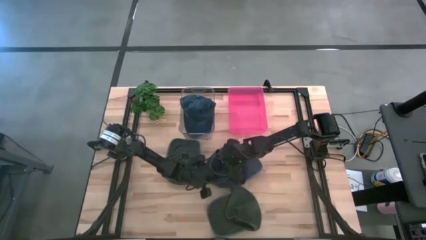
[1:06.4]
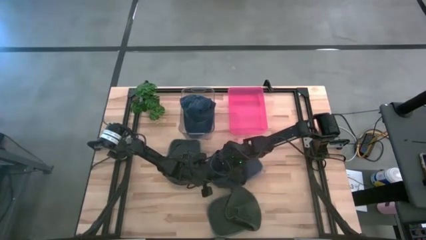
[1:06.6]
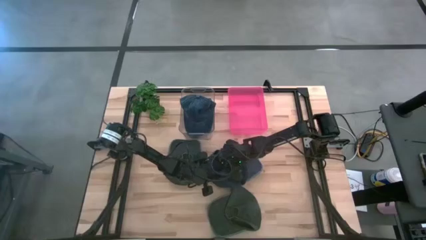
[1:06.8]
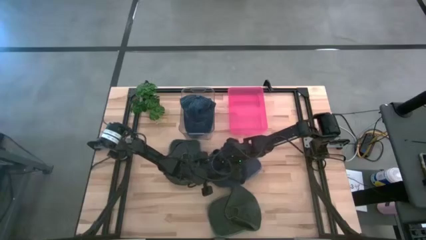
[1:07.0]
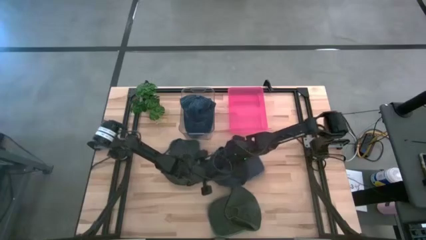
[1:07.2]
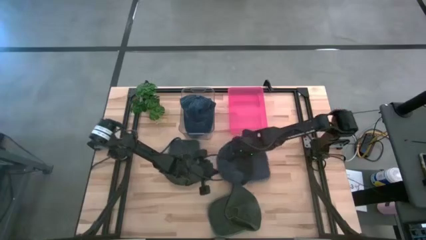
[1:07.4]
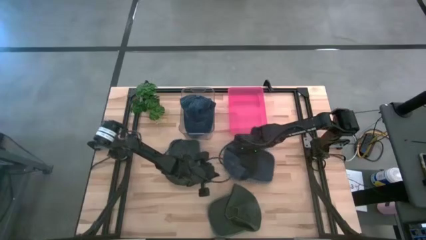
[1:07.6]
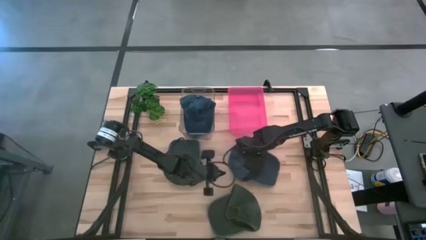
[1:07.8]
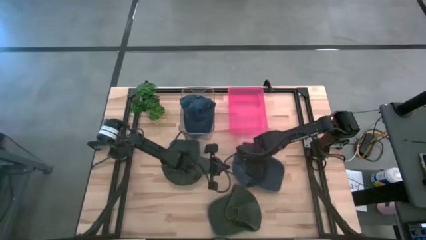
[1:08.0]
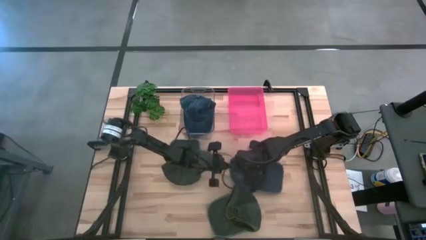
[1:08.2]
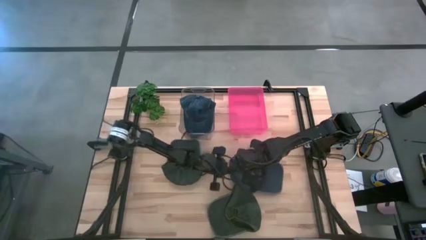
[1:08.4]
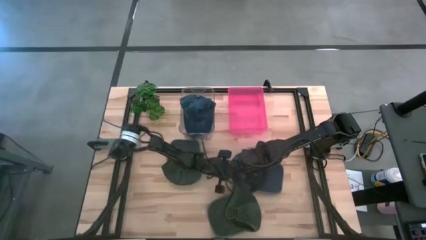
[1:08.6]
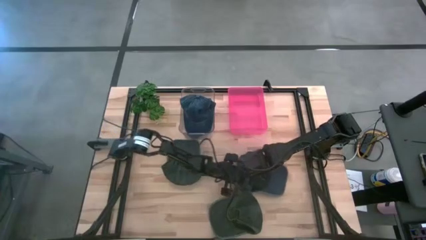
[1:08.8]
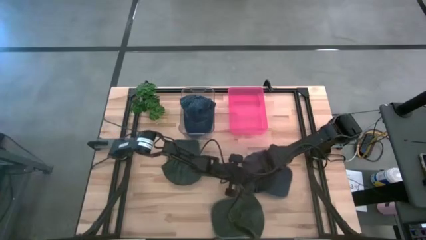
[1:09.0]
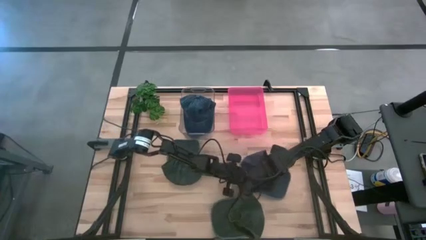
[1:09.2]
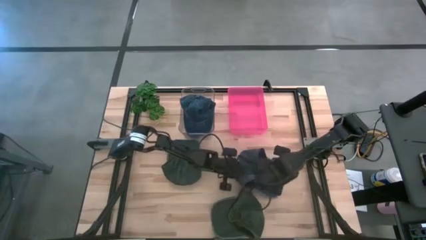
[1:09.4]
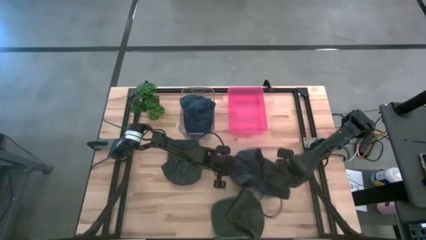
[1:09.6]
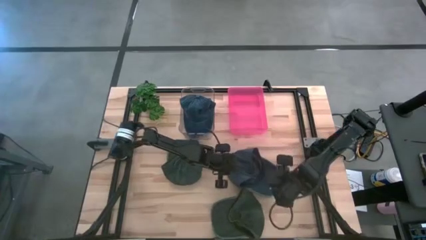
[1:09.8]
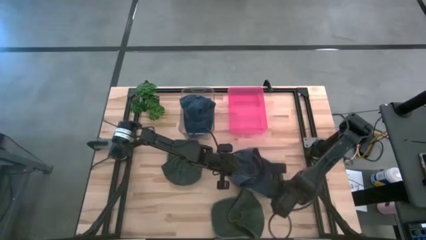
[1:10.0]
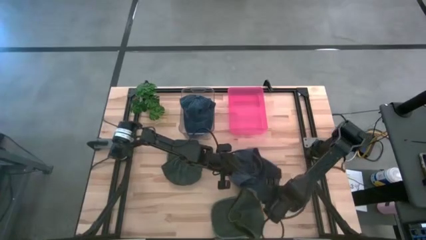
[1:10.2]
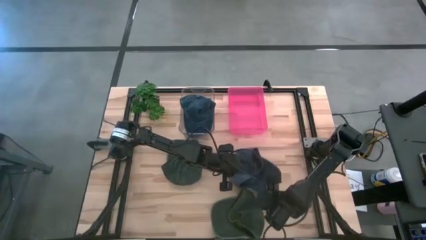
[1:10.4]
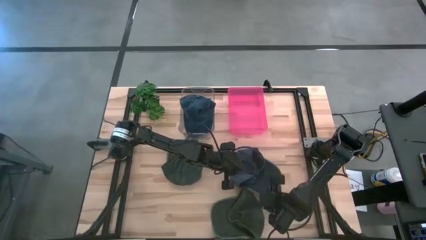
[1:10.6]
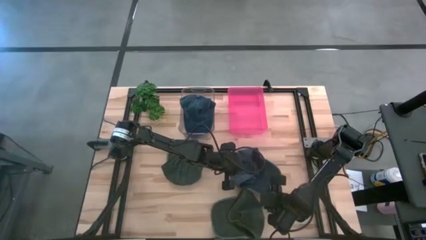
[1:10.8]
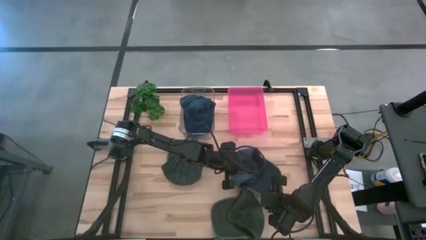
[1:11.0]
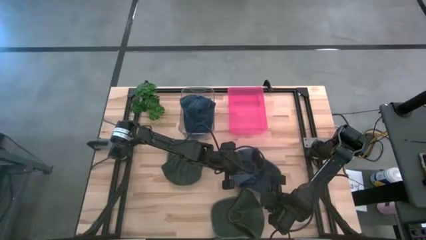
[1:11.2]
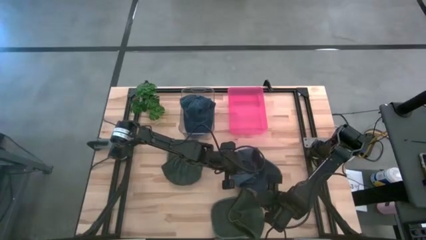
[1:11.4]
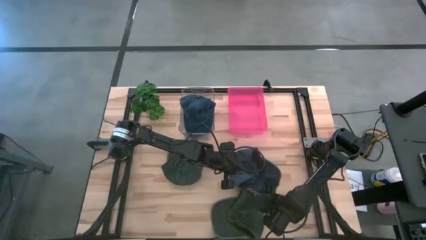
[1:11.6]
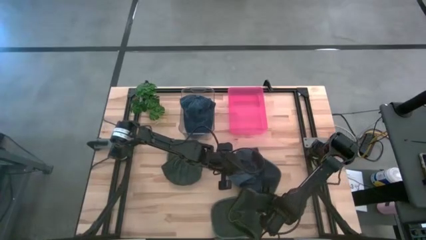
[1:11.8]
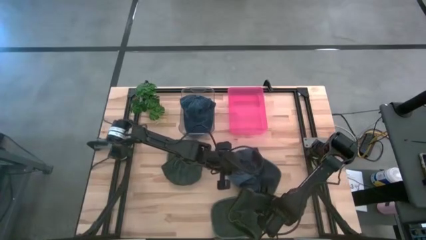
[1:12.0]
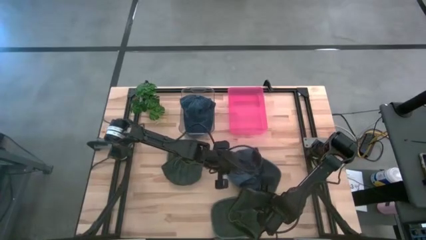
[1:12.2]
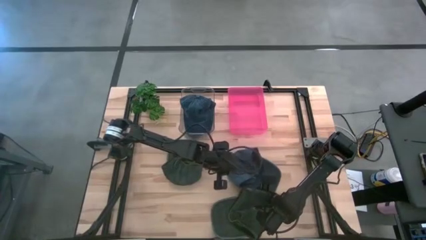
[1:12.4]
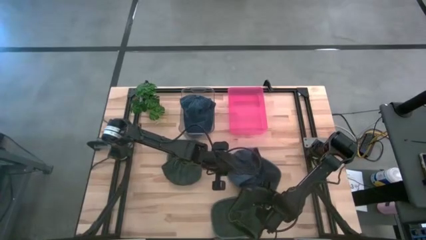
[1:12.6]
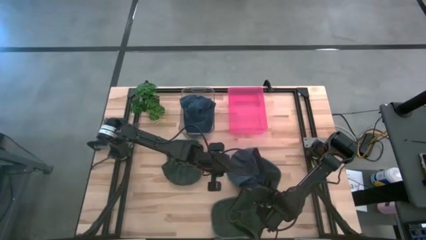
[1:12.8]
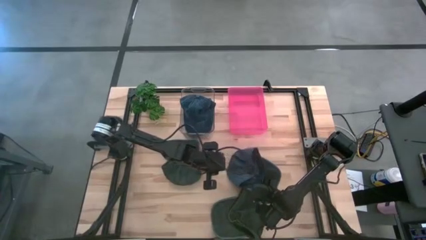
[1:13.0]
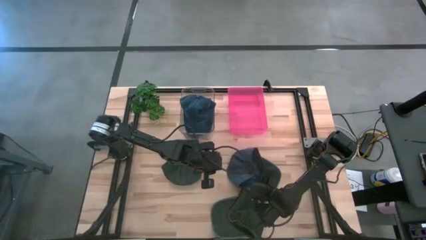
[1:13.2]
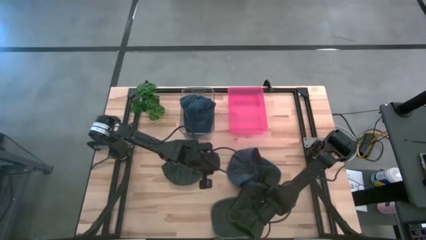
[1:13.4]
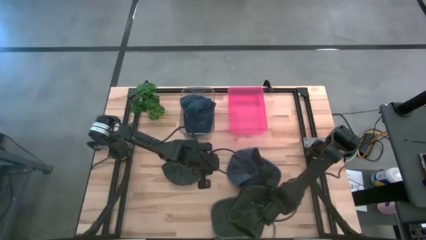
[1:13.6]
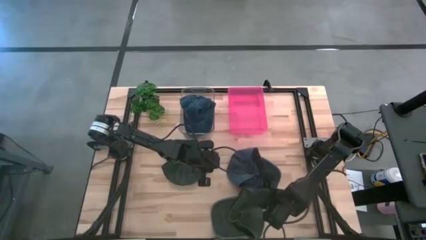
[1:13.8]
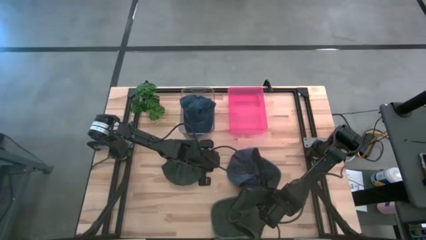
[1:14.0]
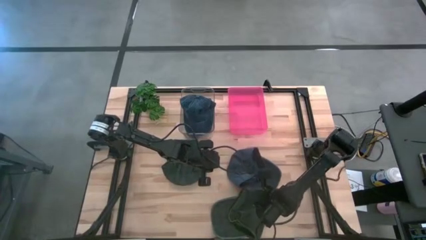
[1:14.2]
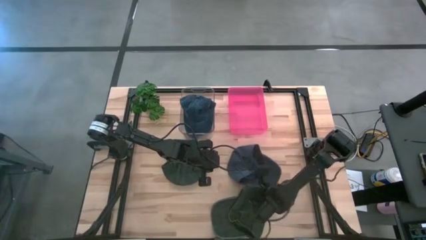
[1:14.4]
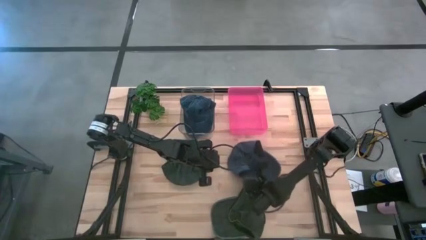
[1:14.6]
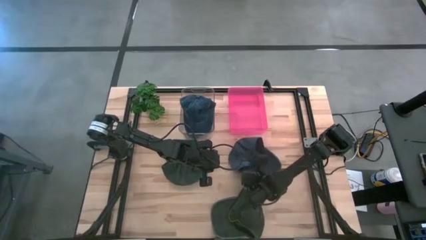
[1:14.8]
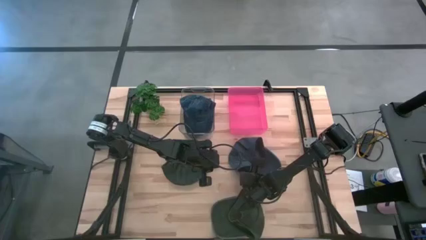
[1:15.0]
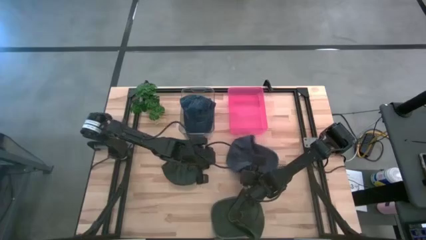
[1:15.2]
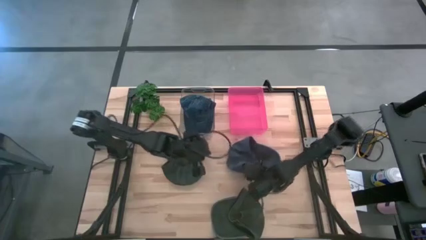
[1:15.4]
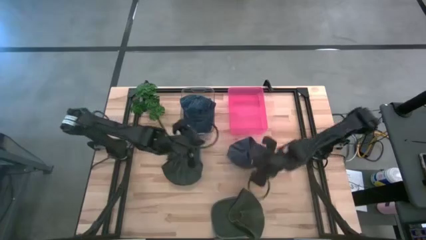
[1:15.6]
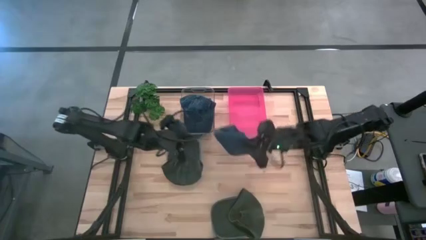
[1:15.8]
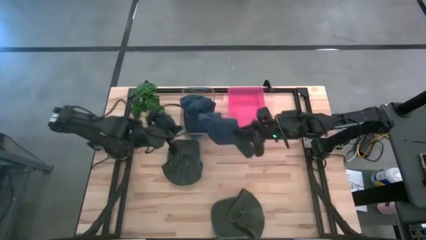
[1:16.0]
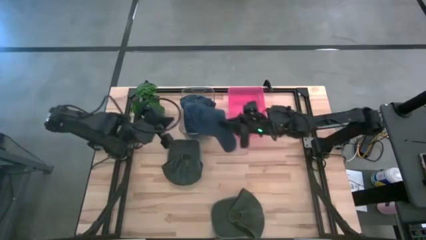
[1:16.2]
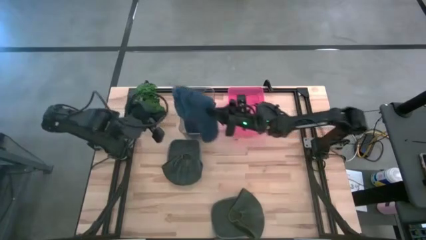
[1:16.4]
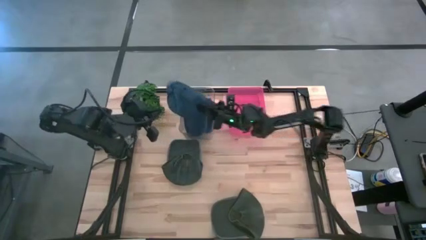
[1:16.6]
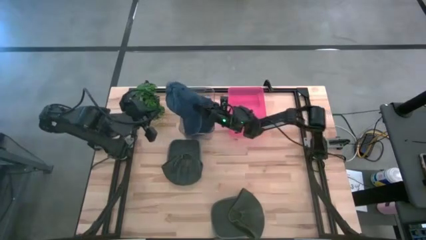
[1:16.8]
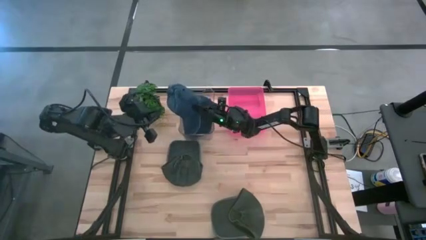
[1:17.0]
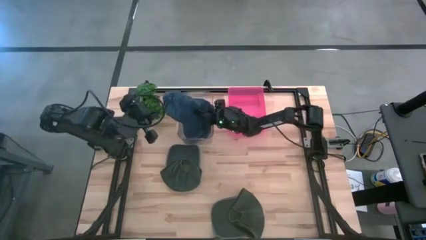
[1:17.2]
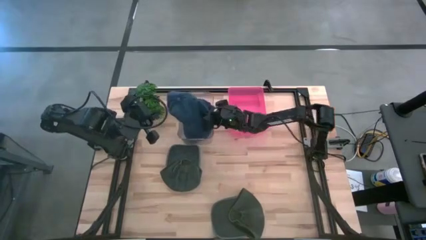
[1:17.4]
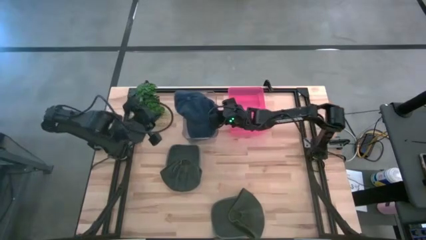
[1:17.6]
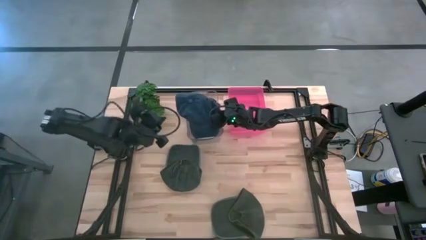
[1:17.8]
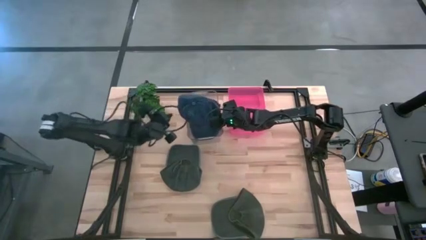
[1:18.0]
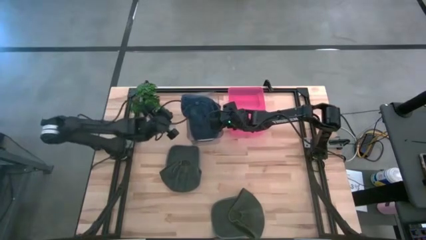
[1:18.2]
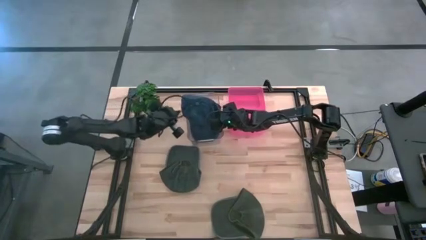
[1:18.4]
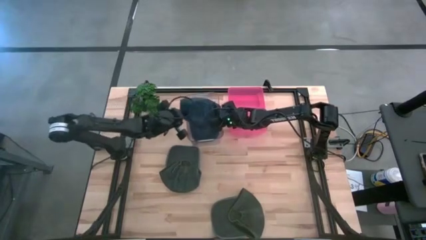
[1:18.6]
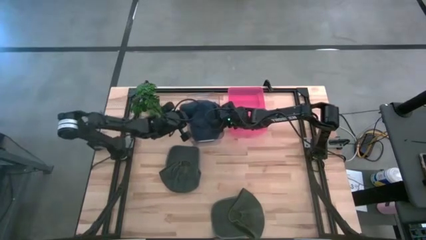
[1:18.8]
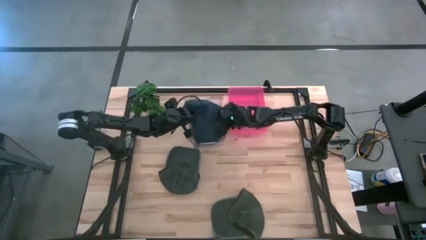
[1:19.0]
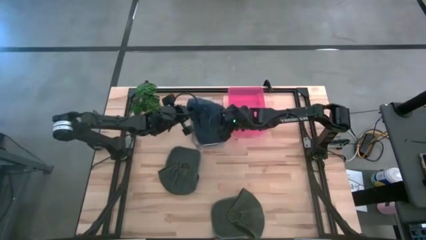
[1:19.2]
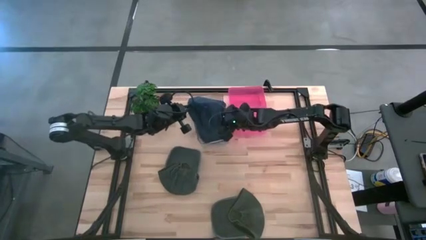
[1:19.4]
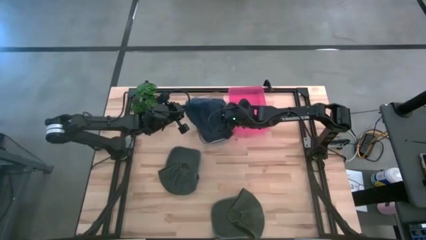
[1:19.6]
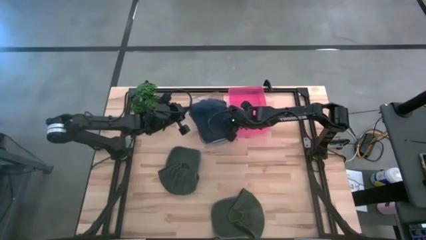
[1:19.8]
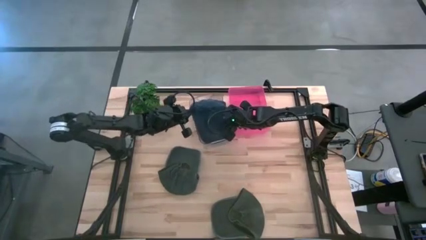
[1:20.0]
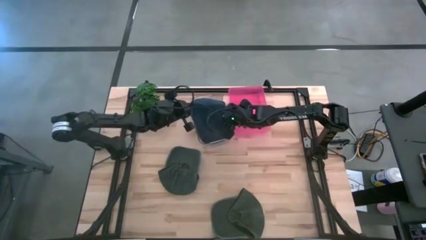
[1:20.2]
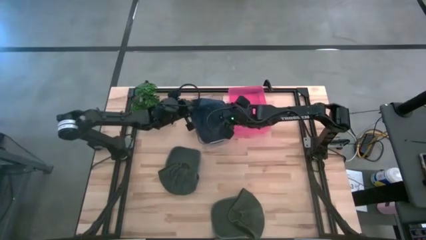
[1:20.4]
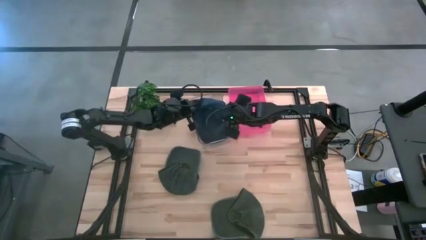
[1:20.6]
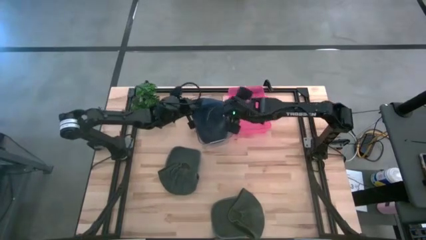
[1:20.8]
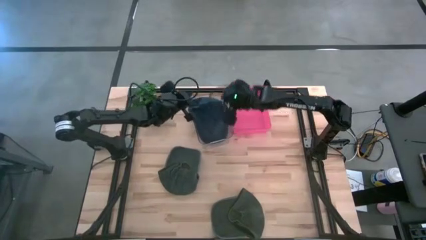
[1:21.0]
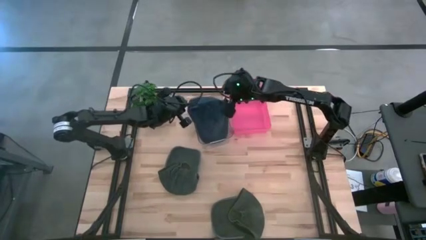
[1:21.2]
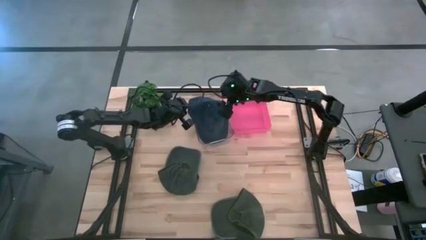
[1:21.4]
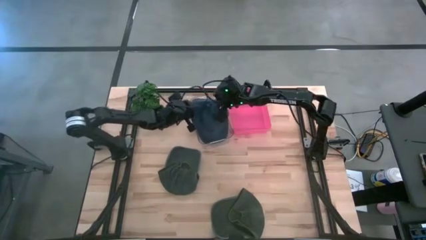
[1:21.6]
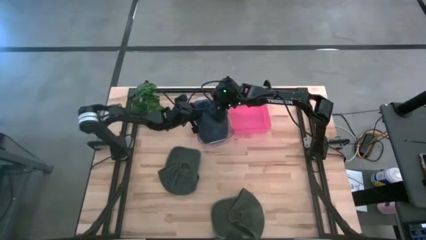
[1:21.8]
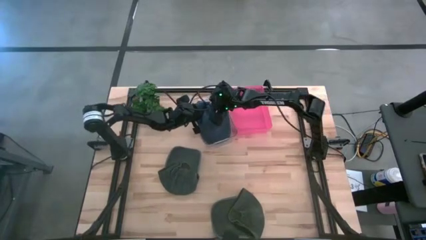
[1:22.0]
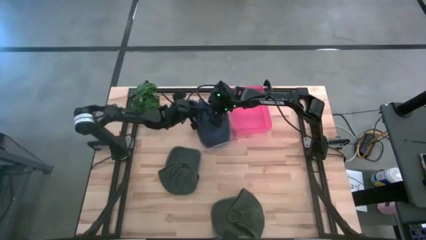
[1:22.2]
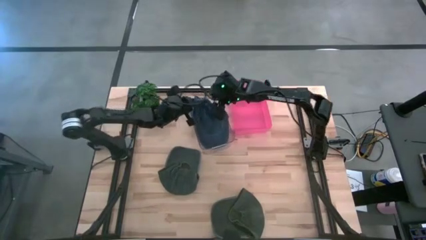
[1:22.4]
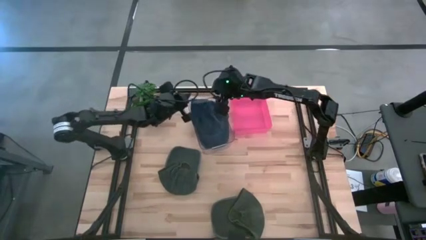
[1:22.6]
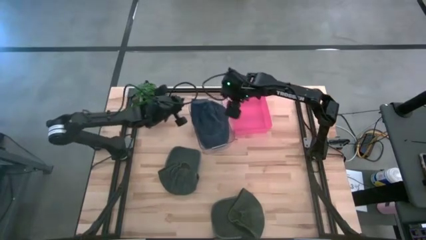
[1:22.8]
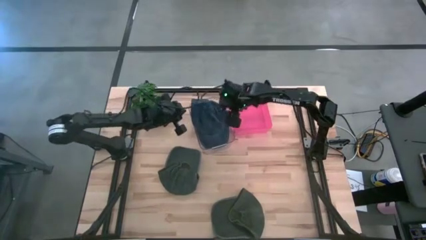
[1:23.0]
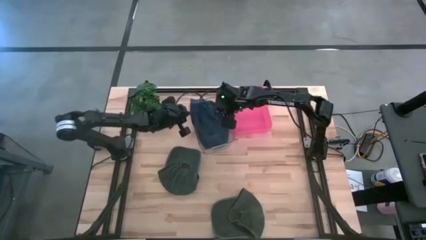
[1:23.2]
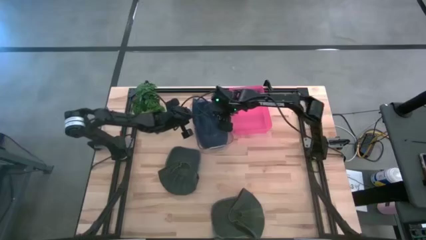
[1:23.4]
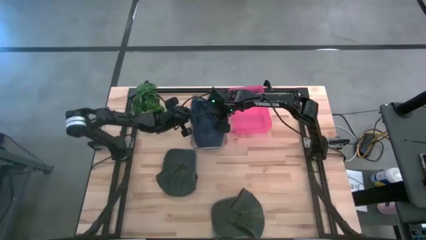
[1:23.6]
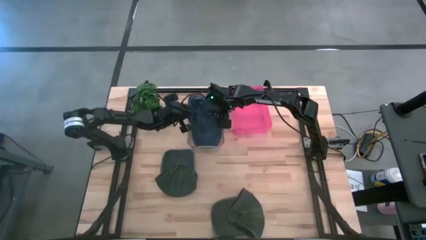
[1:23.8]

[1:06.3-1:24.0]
Task: Pick & Place hat
Put the blue cap into the transparent bin
